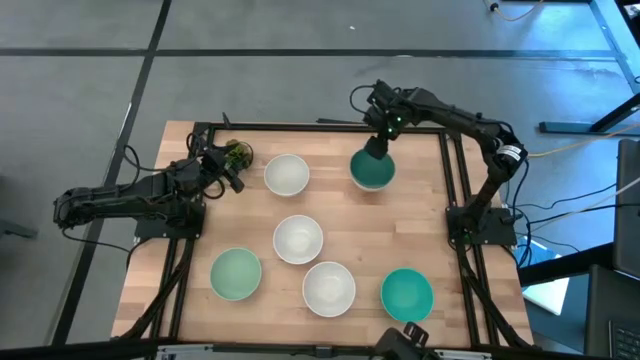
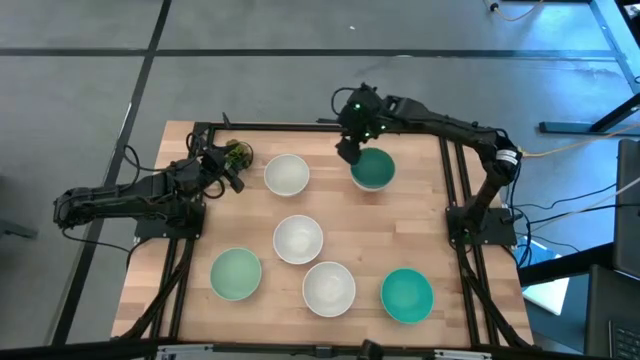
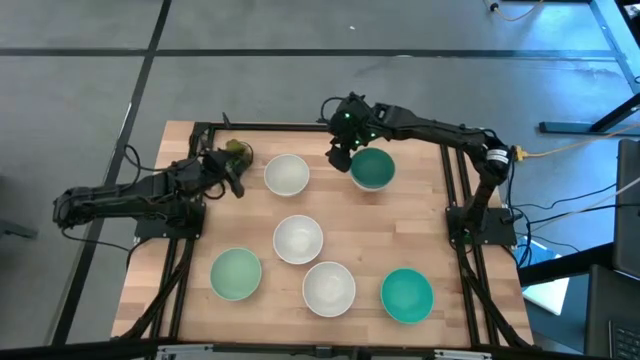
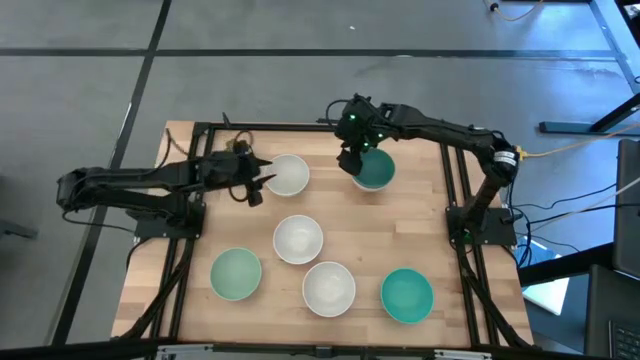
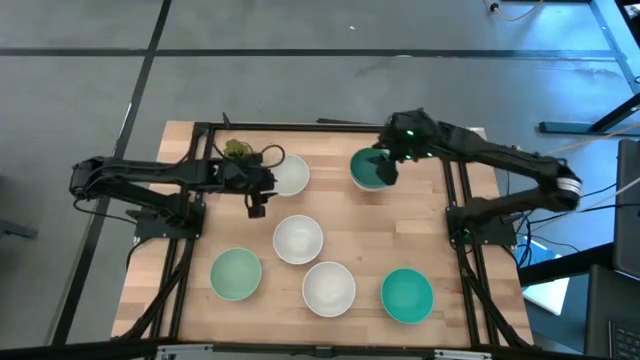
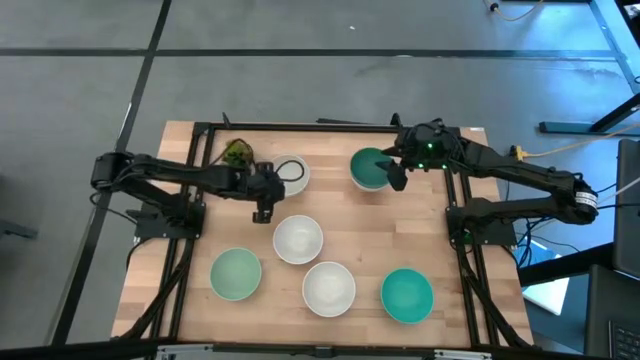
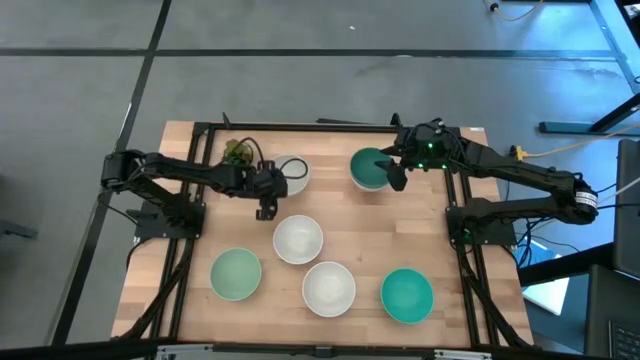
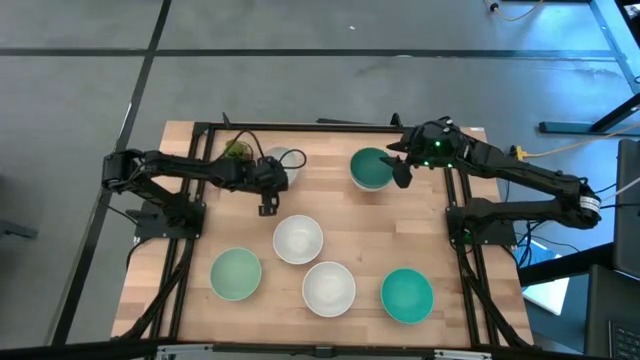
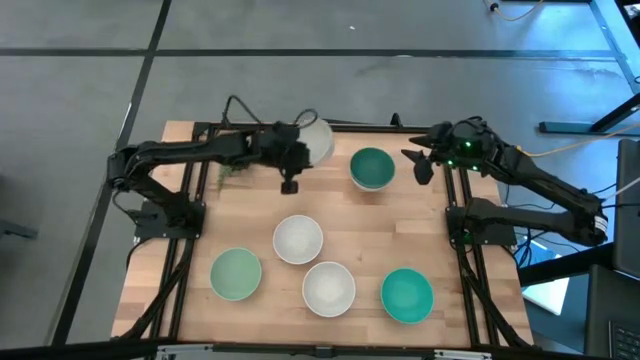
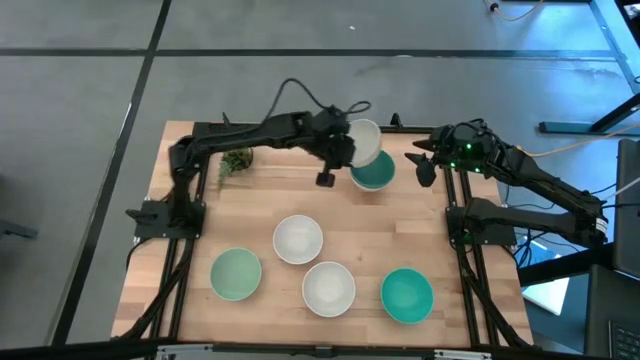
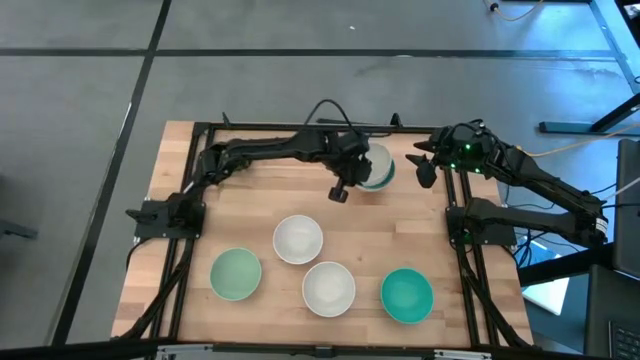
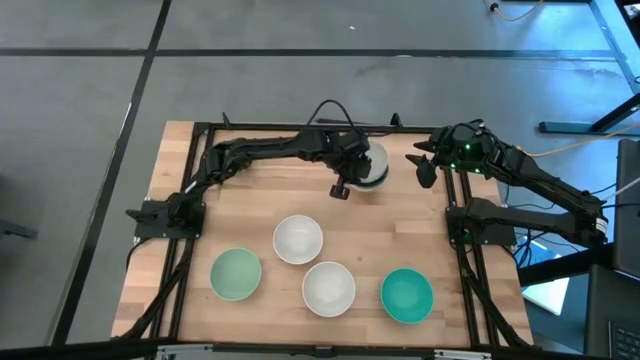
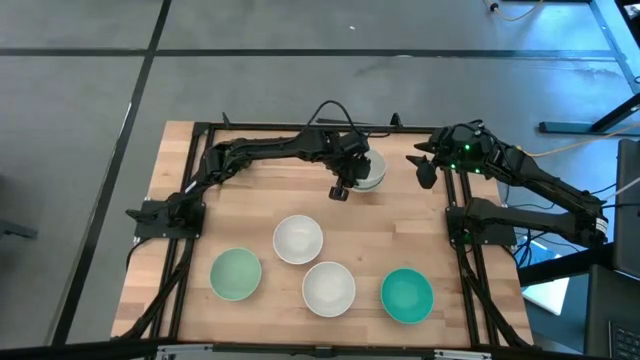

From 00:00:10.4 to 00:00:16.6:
Task: Nest bowls inside each other
Stack the top white bowl on top of the dark green bowl

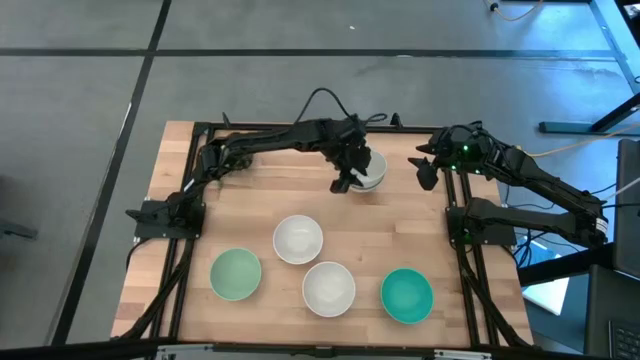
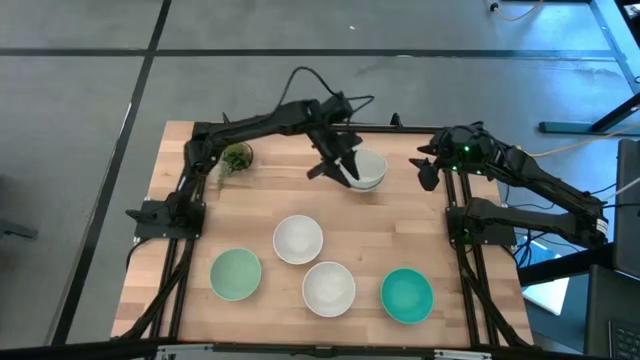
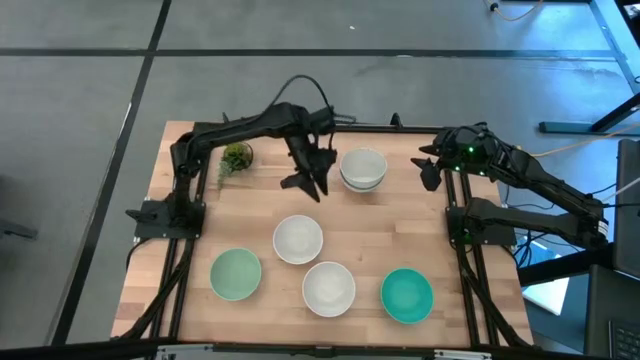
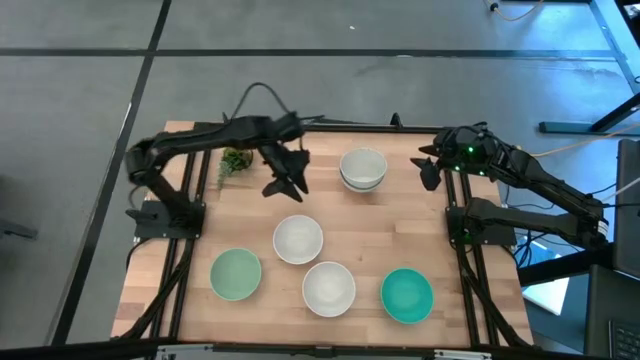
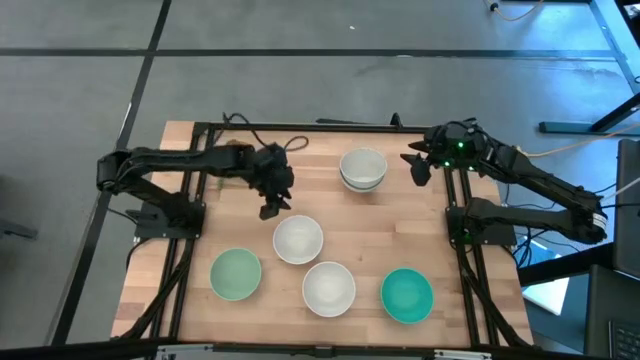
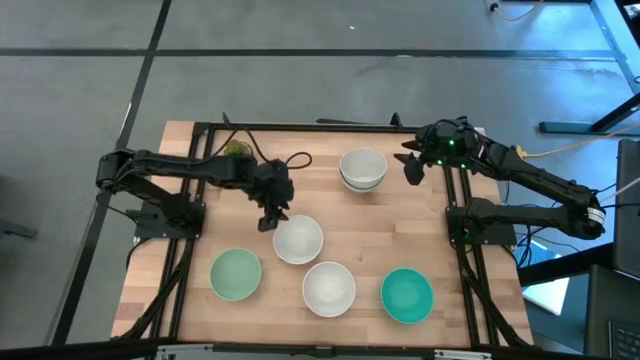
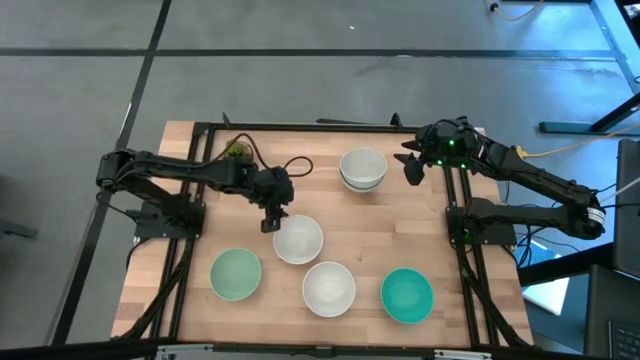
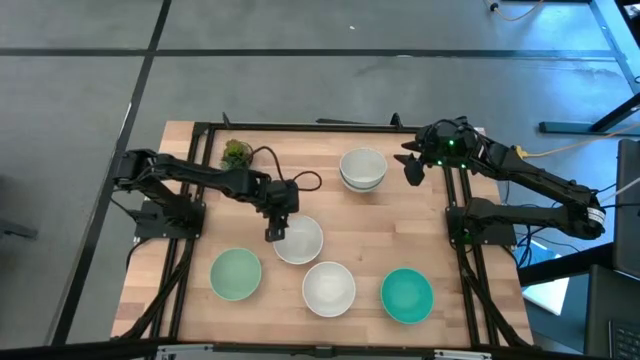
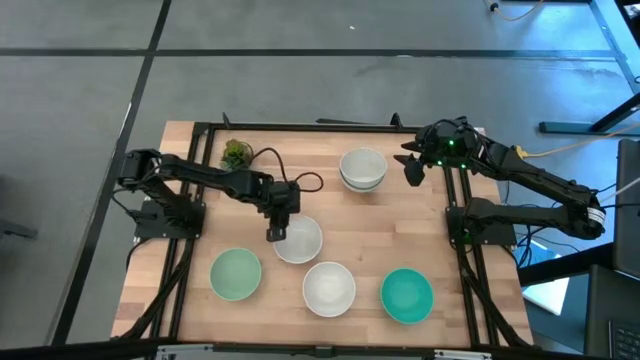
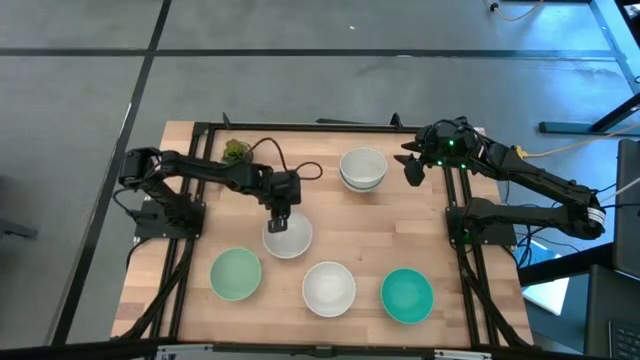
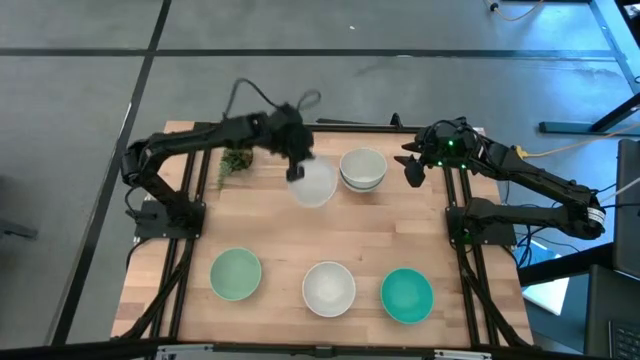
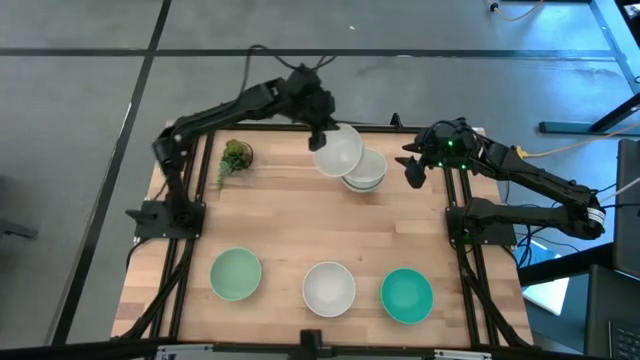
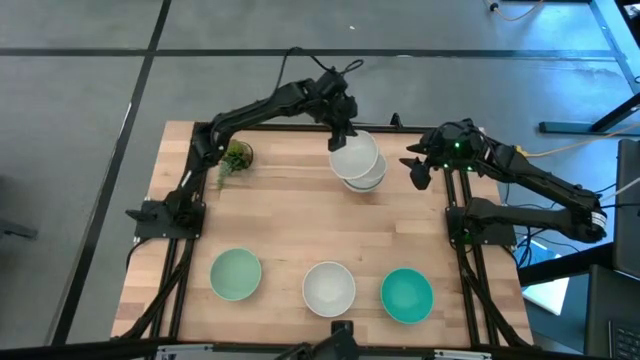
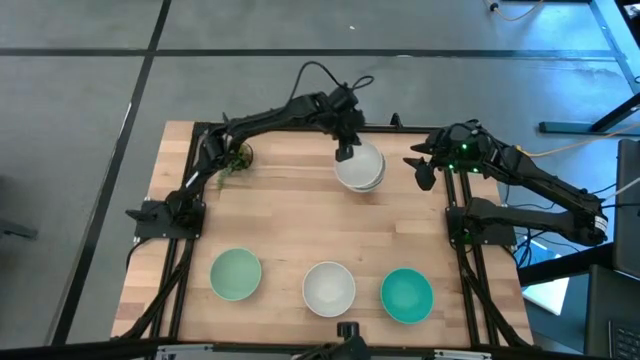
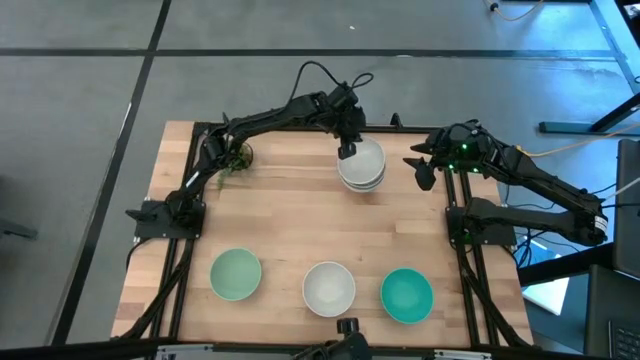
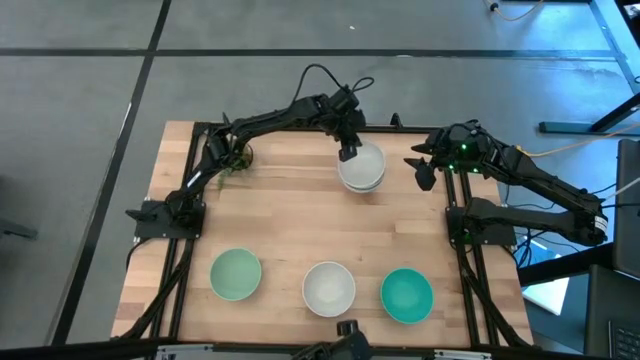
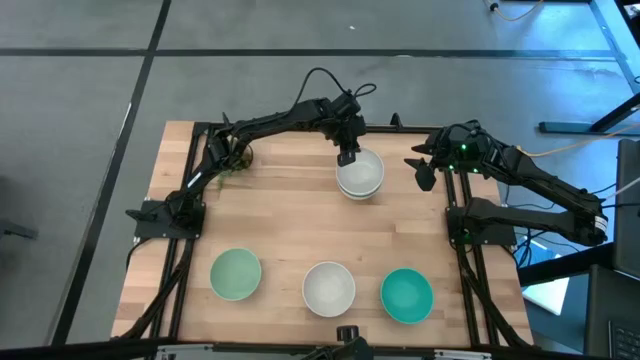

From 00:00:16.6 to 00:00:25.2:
Stack the top white bowl on top of the white bowl

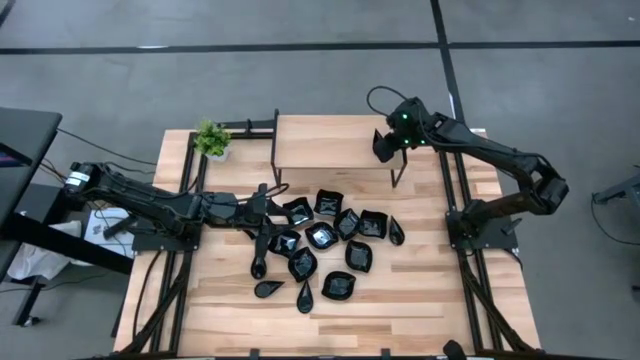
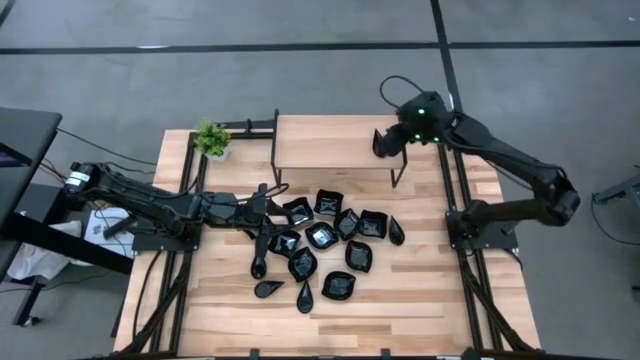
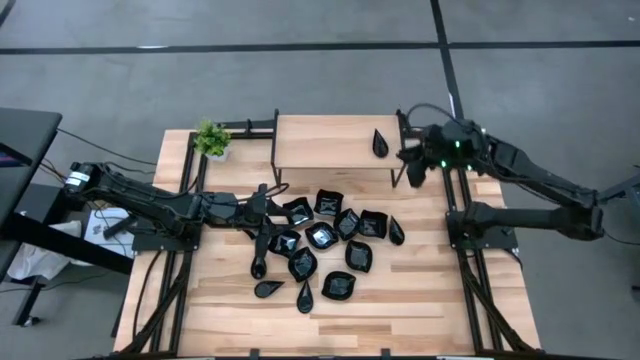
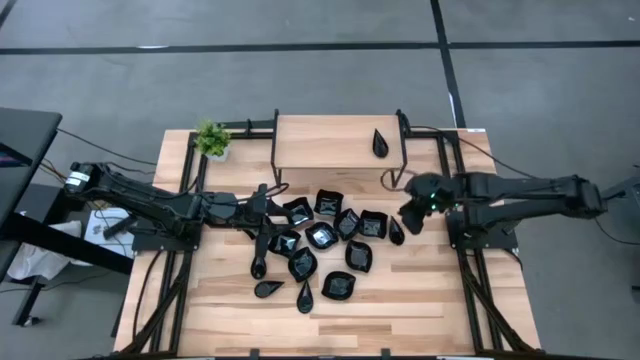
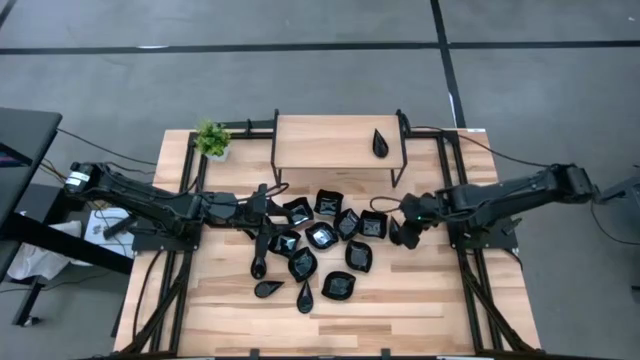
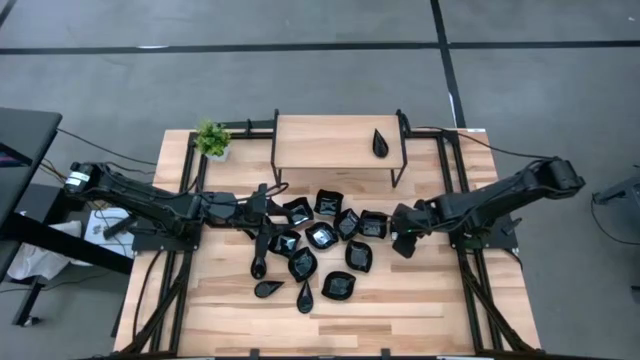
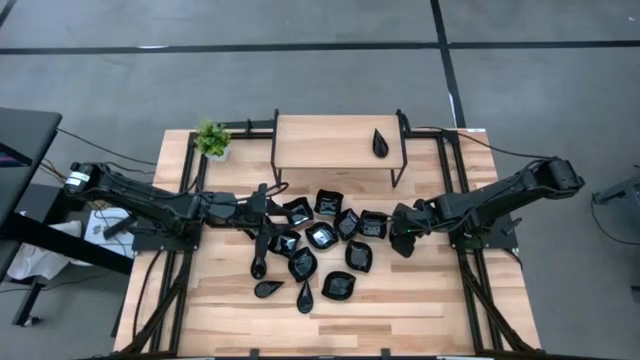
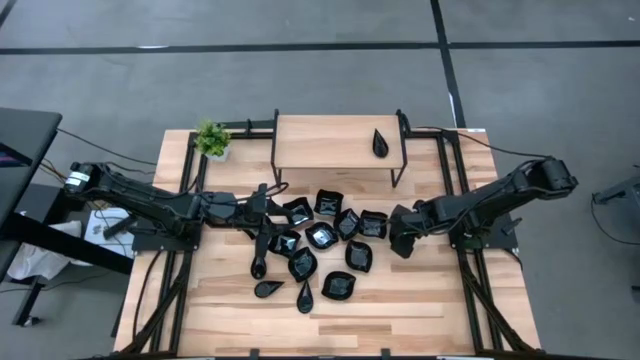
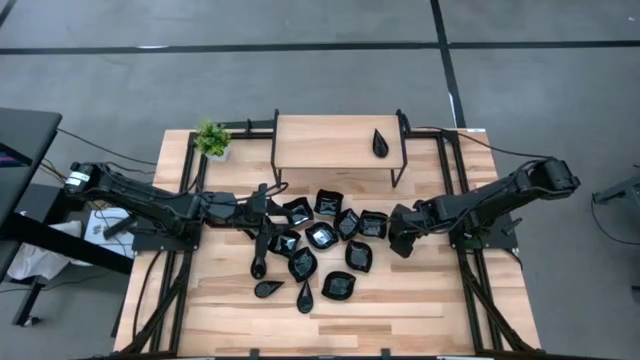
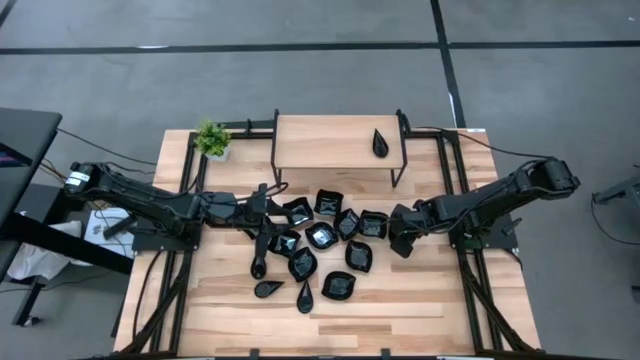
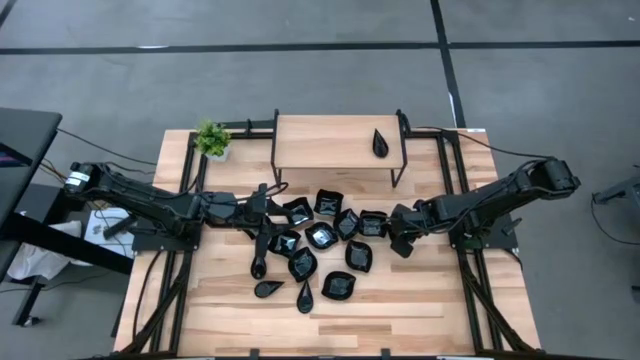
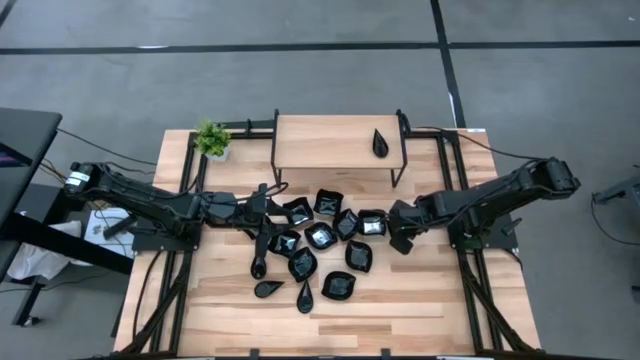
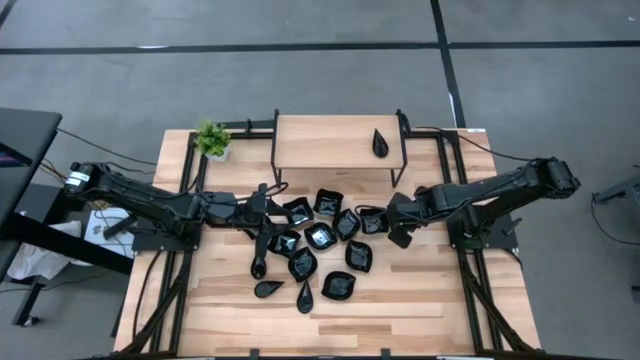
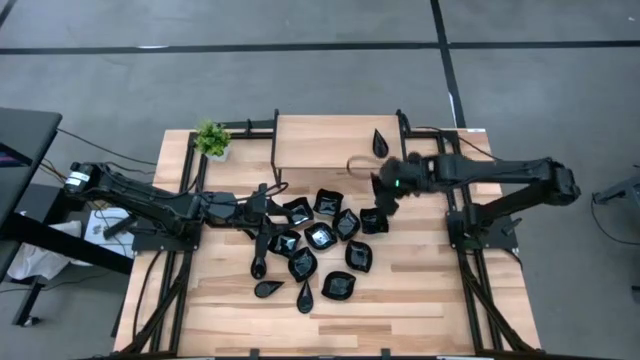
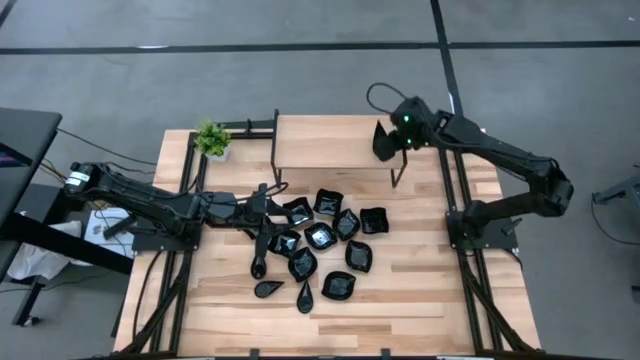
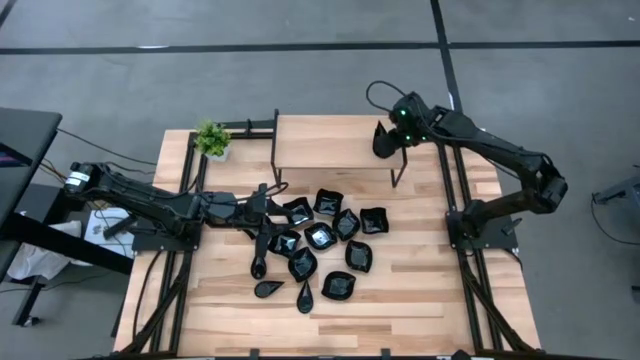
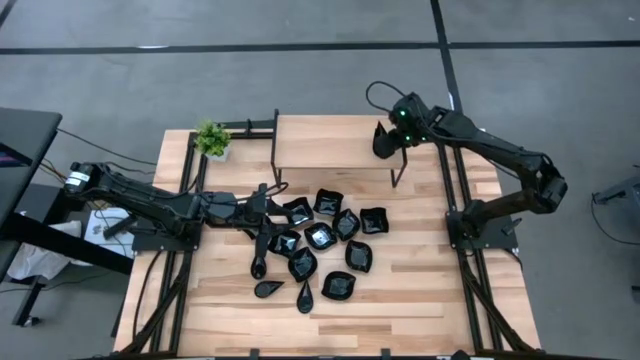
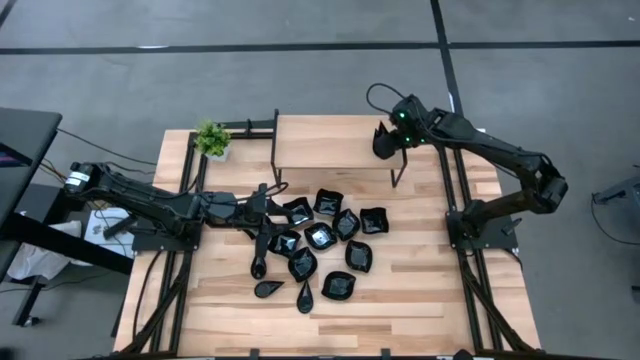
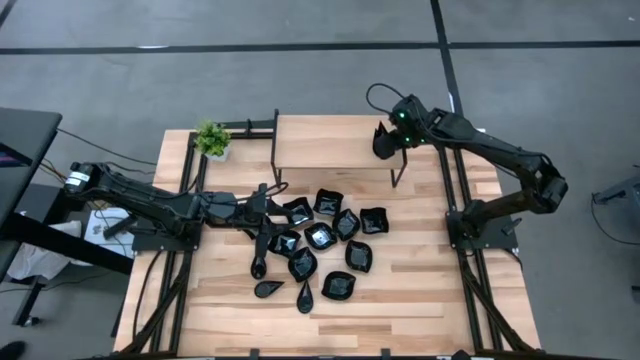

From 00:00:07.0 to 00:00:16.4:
Task: Pick & Place Mini shaped plates
Stack the black drop shaped plate on top of the black drop shaped plate on the shelf
